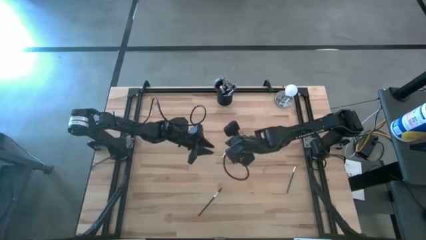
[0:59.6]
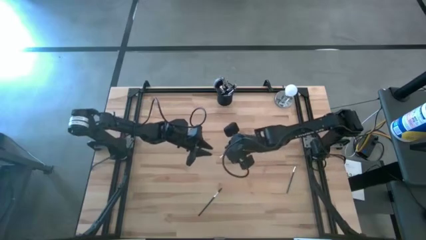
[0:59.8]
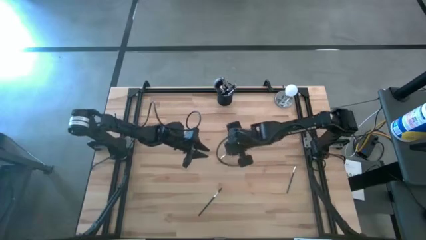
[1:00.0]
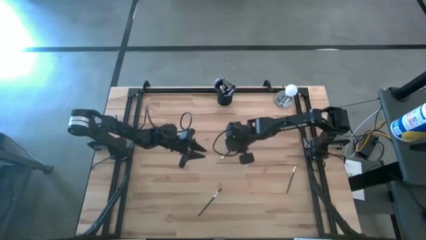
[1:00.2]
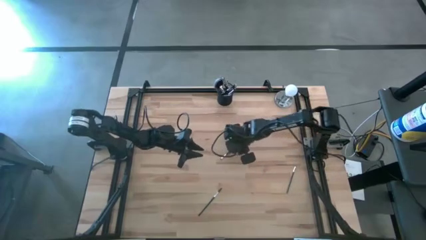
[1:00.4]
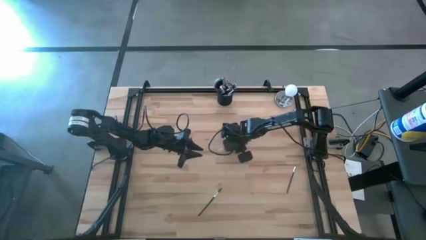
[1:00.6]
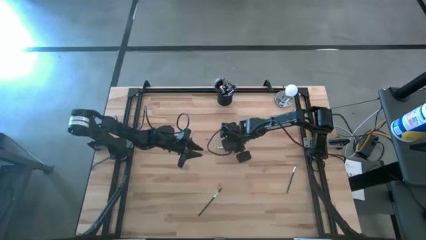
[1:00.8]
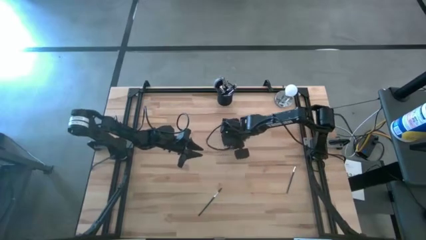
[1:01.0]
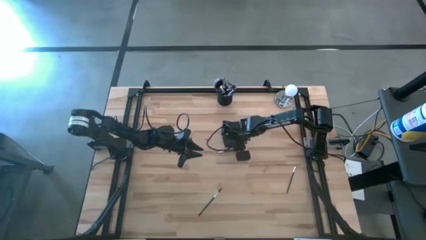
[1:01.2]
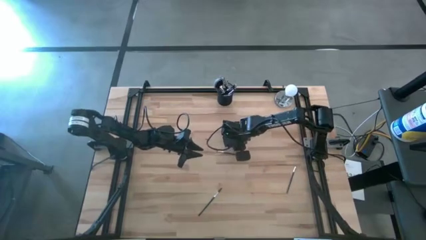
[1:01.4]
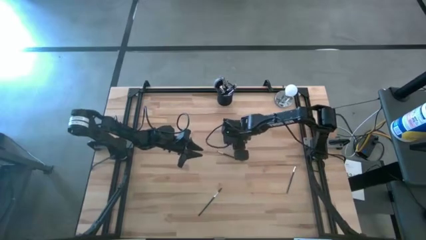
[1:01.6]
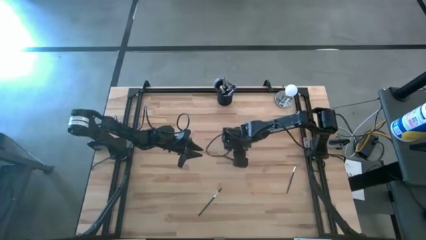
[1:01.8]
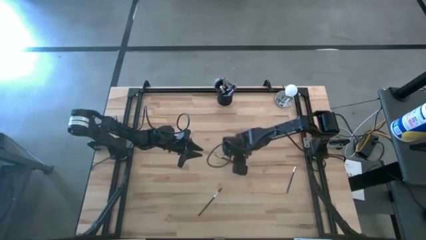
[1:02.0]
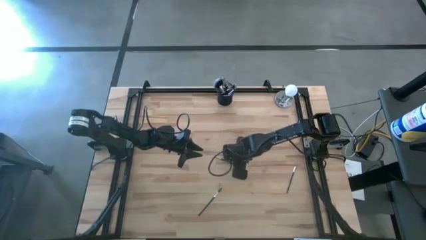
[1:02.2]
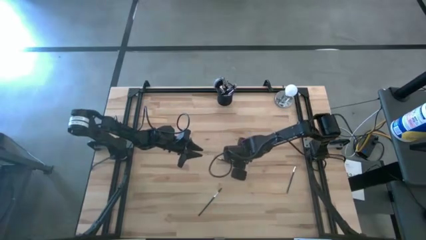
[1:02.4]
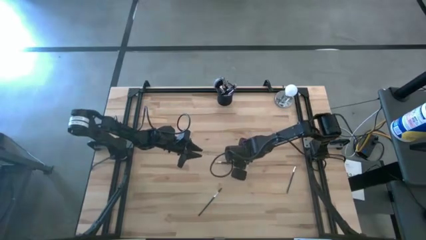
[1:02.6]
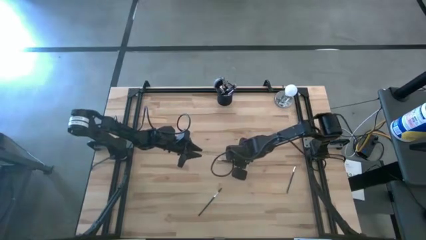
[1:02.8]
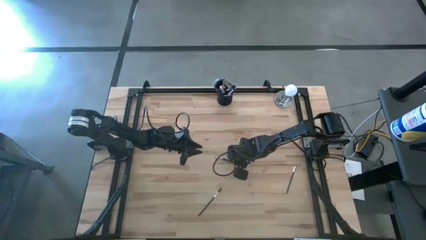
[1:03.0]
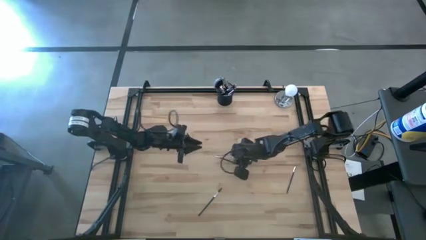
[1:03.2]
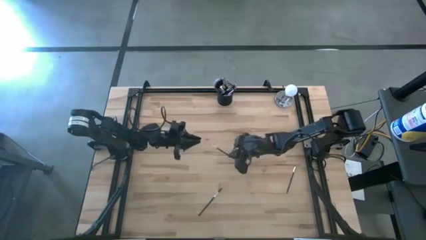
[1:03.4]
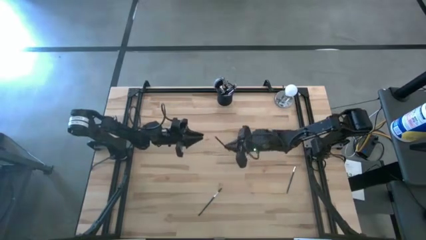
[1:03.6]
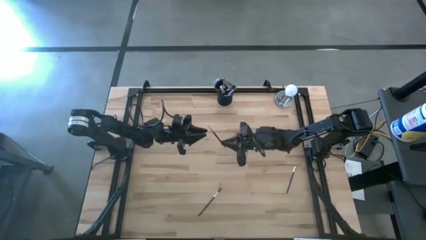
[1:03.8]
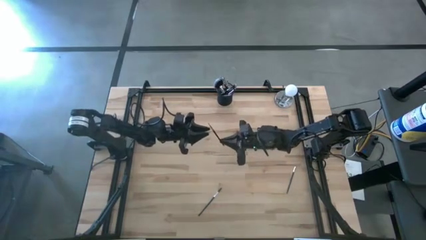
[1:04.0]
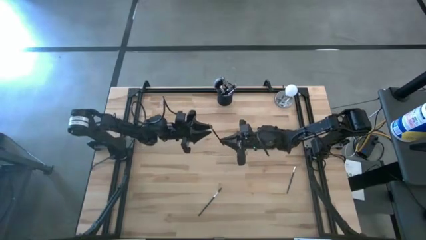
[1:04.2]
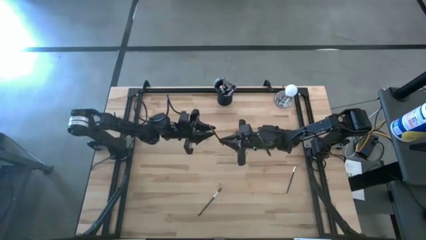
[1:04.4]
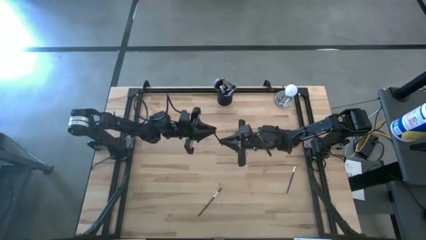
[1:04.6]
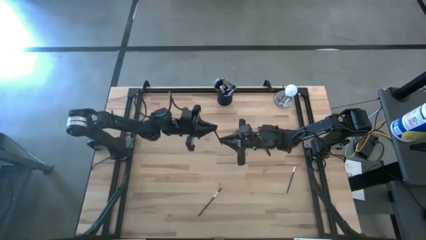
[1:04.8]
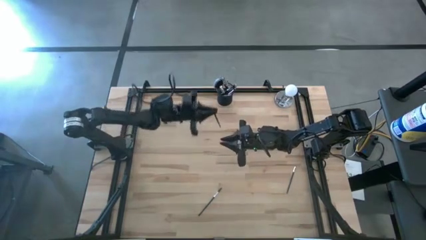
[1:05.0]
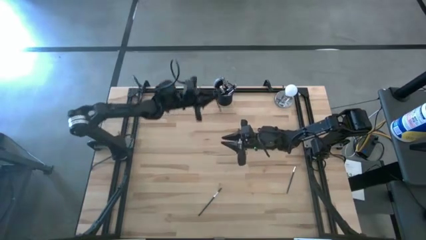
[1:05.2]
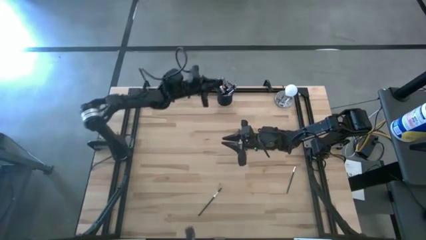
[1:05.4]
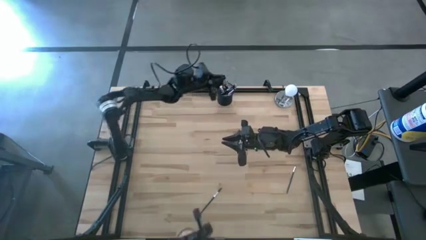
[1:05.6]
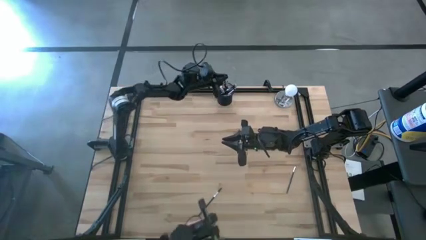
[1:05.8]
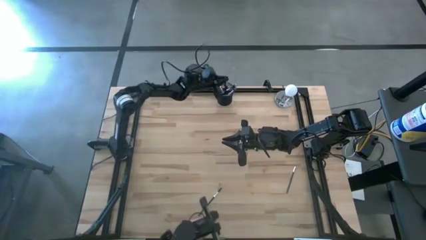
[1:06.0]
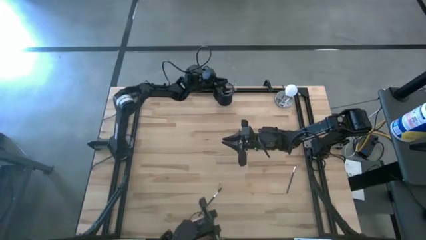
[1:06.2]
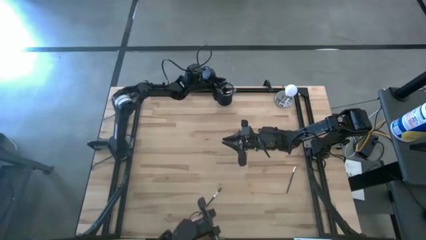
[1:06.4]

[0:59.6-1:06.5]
Task: Put items in baskets/containers
Put the black eyeshadow brush into the black pen holder

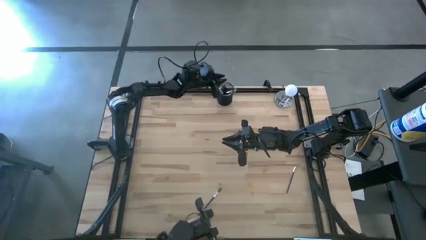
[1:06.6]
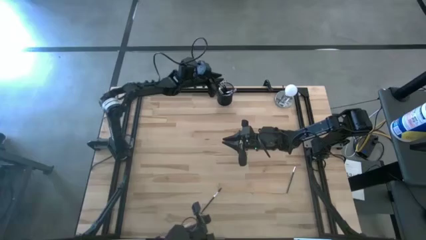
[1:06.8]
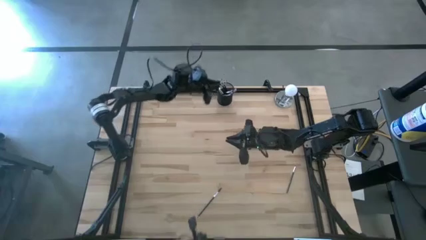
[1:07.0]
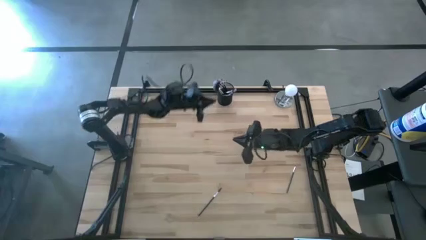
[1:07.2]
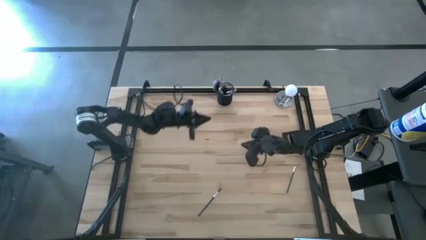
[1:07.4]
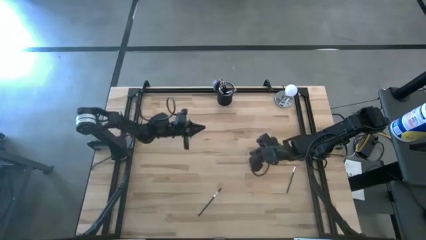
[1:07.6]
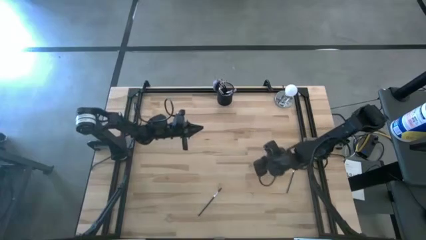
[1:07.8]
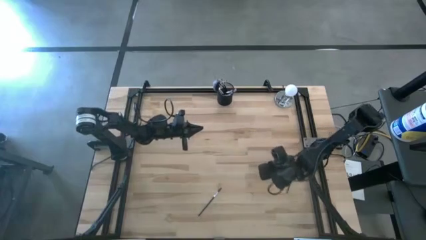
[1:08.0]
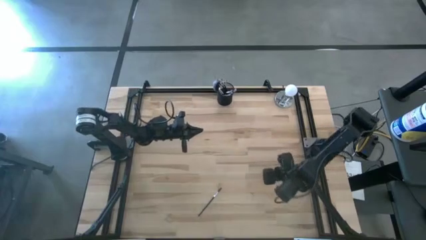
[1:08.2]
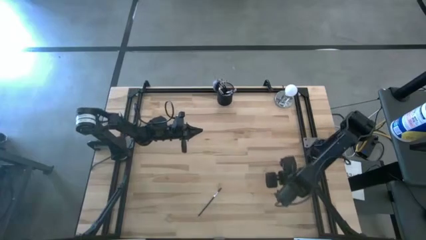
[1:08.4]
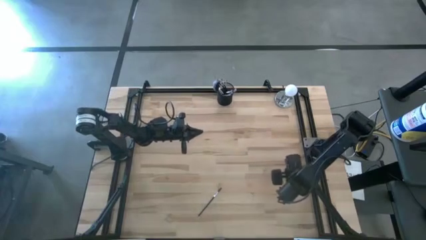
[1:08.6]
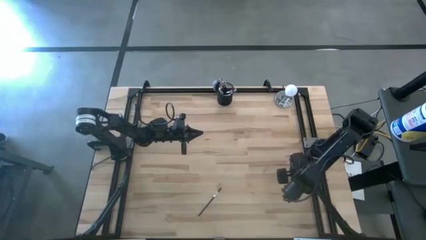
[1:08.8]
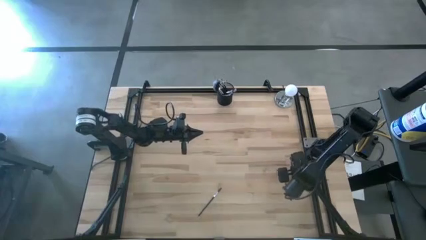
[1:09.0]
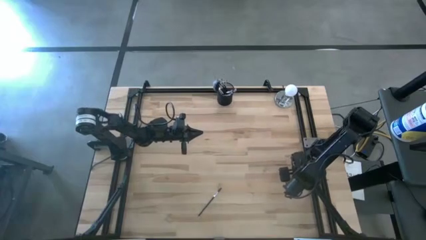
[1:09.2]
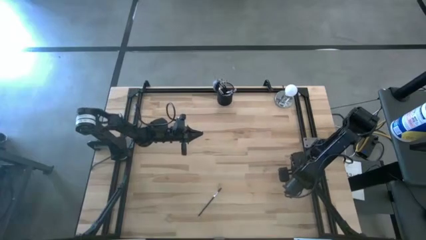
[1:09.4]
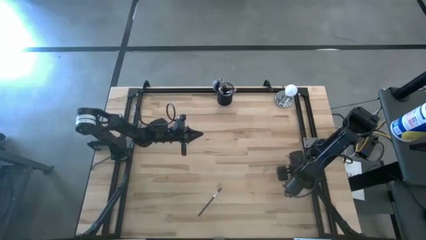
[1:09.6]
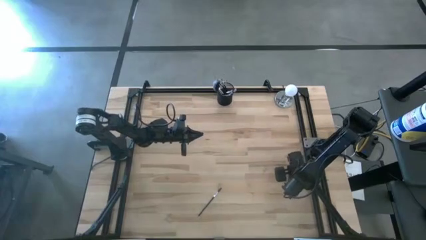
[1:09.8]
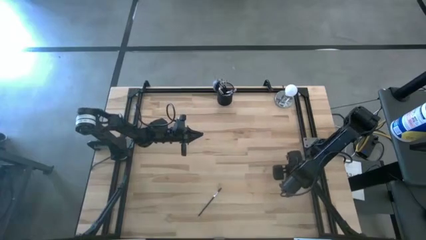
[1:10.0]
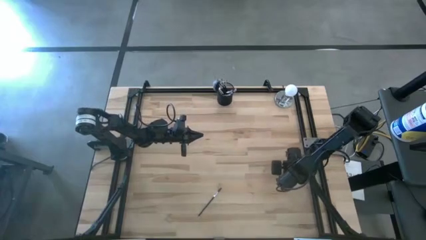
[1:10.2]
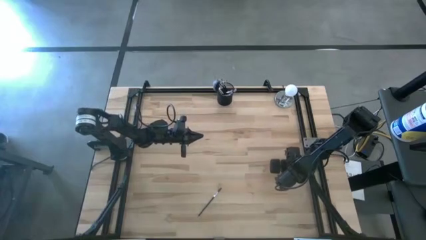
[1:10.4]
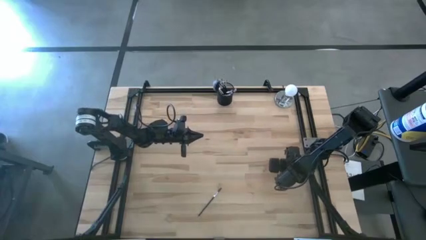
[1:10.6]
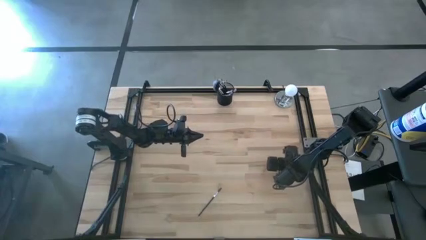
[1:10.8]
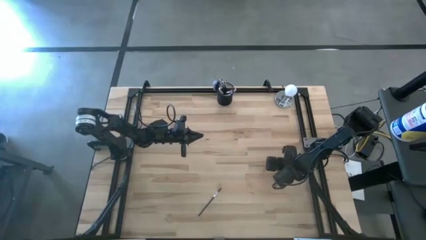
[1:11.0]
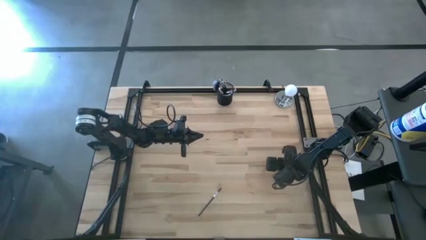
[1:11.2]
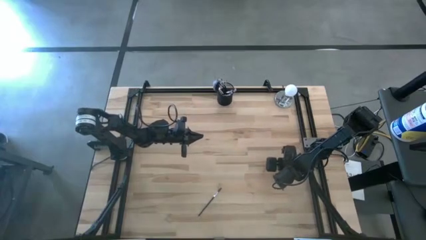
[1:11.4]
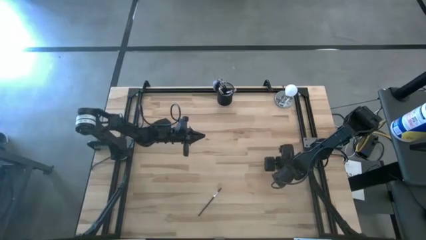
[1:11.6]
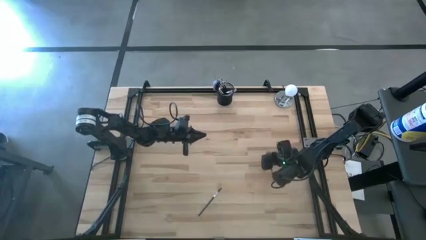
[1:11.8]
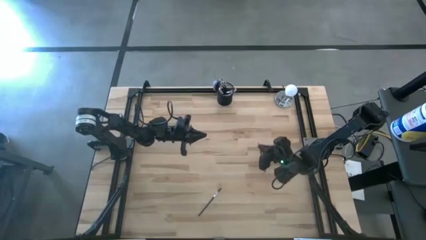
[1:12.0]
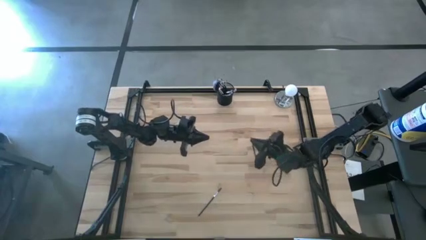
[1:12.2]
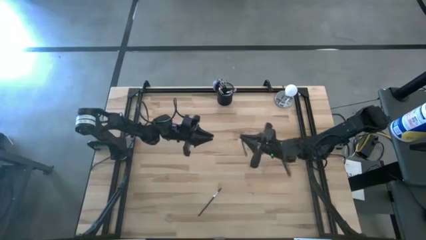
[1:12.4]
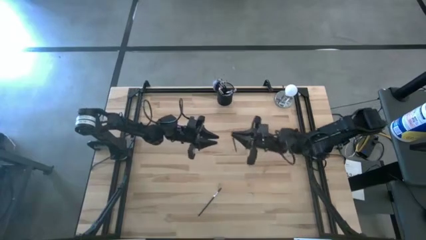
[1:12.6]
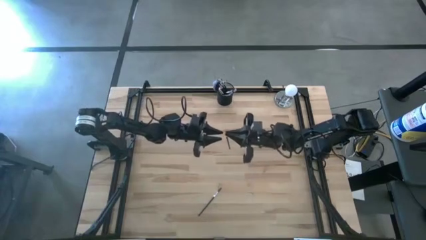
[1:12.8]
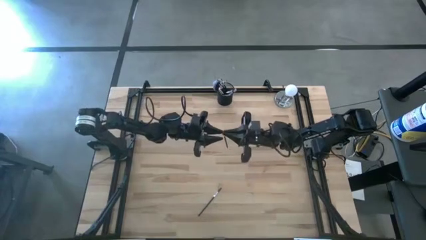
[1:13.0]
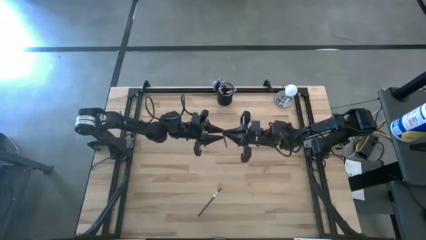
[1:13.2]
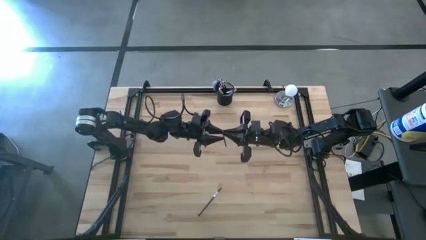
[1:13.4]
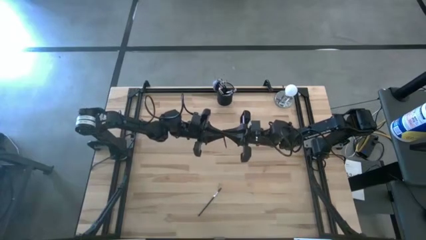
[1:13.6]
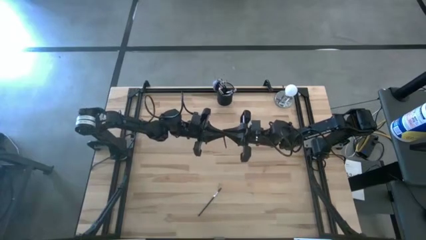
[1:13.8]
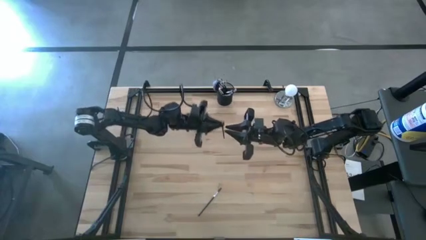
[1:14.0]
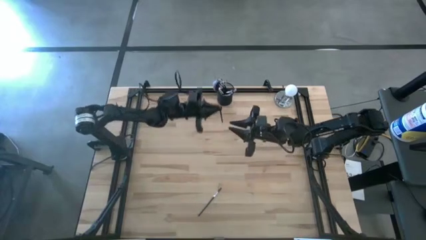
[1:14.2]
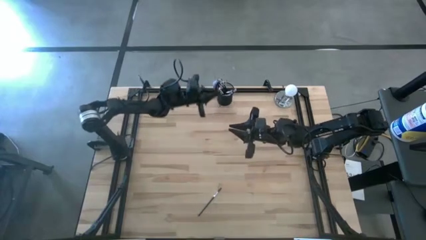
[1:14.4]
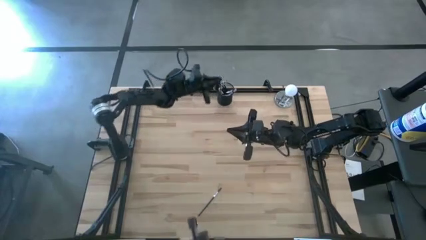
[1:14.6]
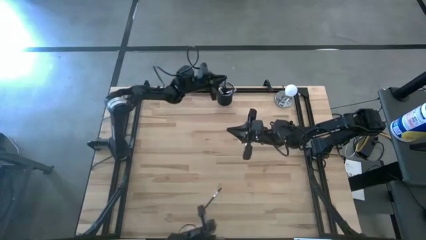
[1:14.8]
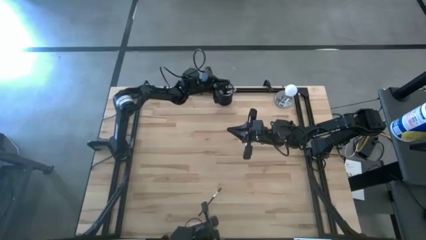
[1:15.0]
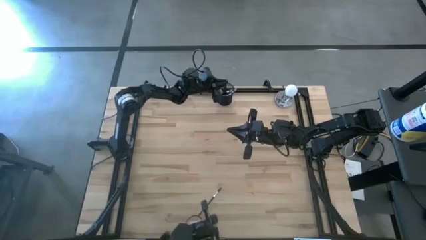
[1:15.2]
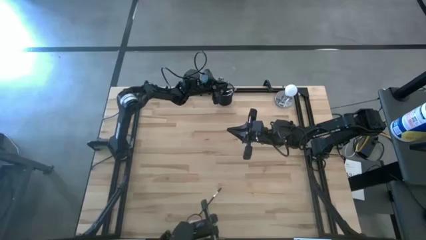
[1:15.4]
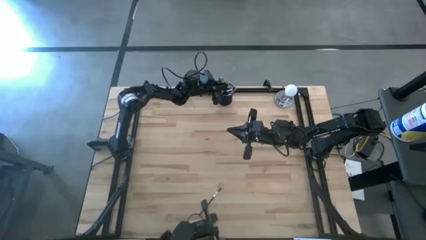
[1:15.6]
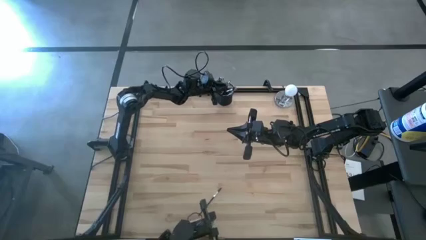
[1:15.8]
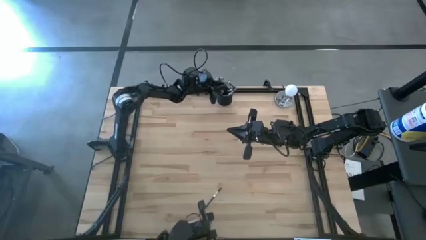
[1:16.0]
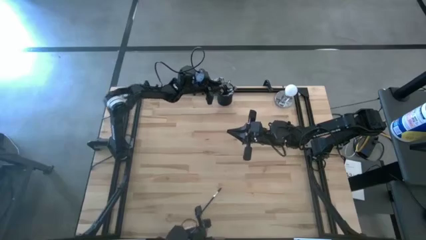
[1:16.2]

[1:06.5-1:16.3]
Put the black eyeshadow brush into the black pen holder
